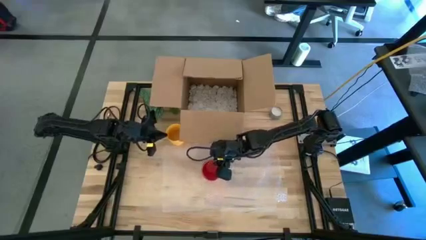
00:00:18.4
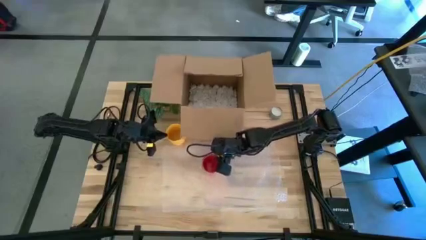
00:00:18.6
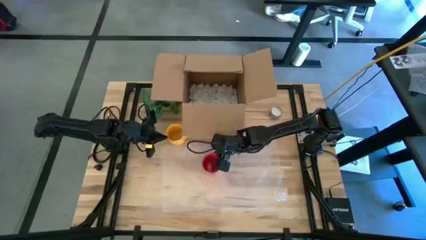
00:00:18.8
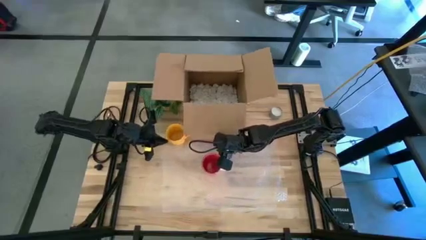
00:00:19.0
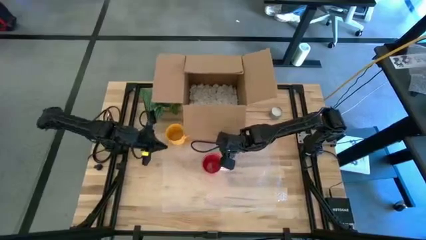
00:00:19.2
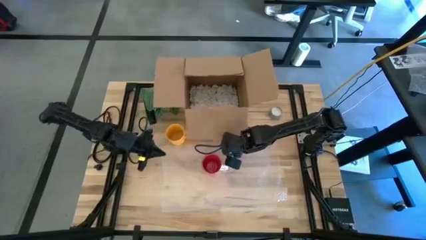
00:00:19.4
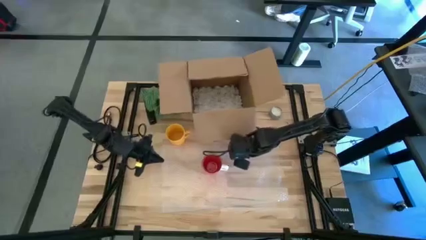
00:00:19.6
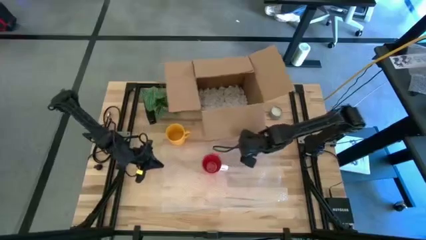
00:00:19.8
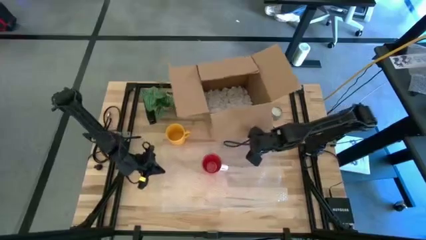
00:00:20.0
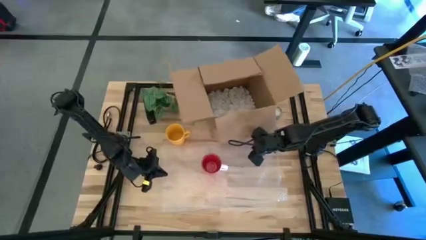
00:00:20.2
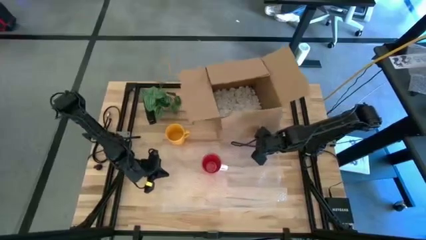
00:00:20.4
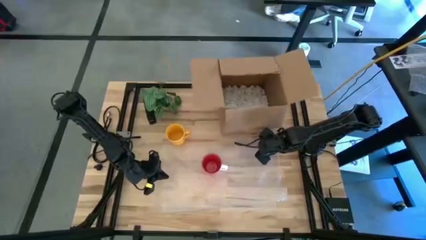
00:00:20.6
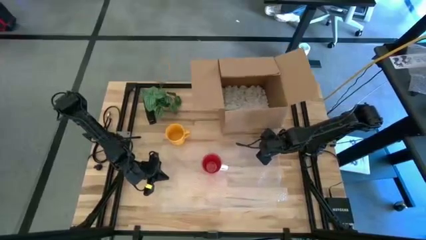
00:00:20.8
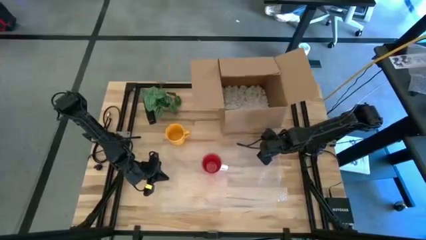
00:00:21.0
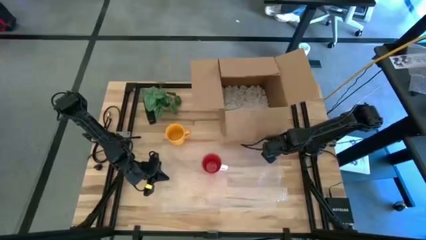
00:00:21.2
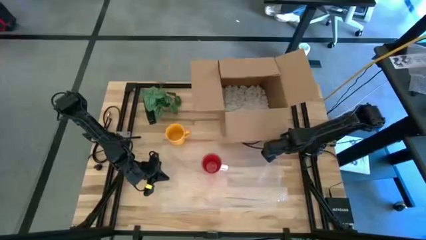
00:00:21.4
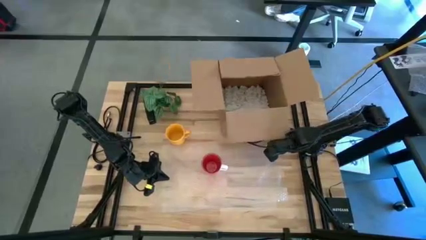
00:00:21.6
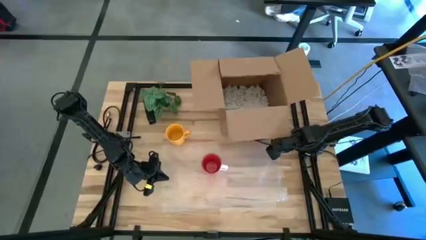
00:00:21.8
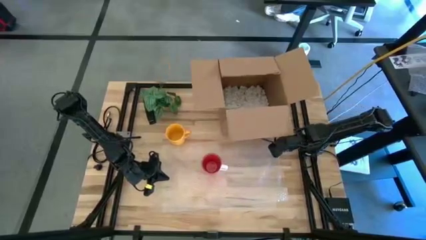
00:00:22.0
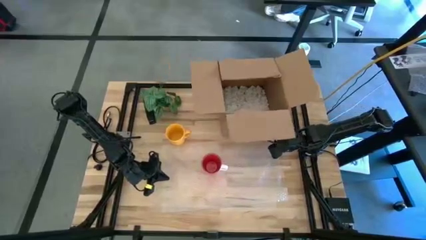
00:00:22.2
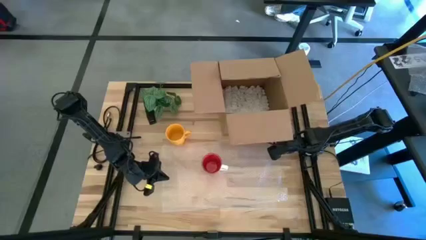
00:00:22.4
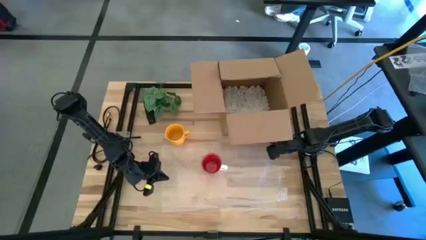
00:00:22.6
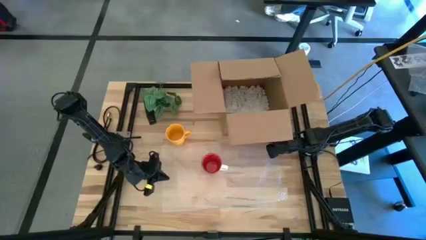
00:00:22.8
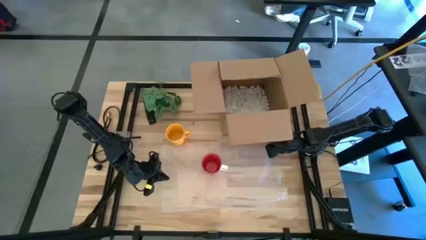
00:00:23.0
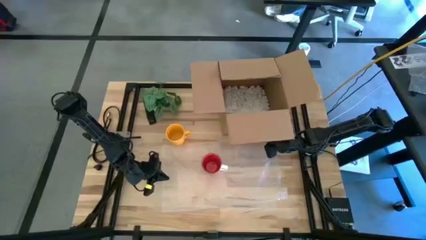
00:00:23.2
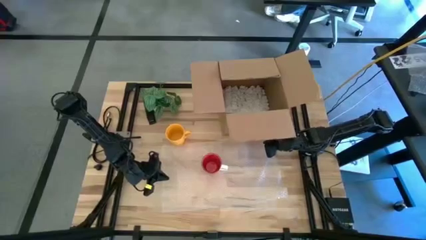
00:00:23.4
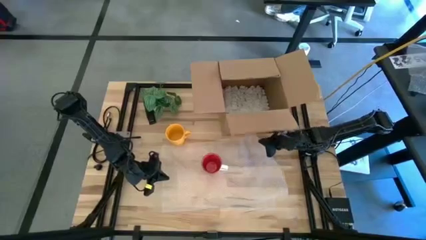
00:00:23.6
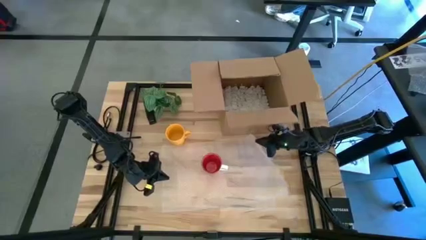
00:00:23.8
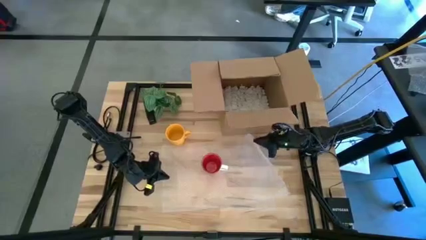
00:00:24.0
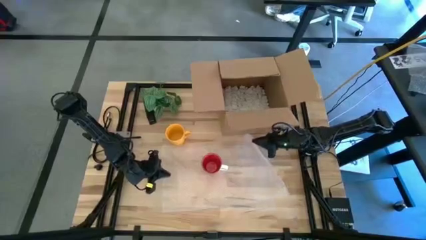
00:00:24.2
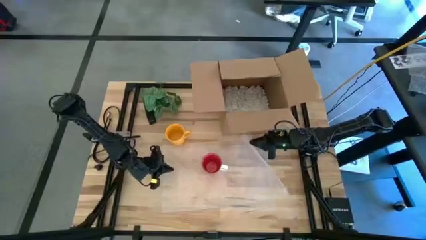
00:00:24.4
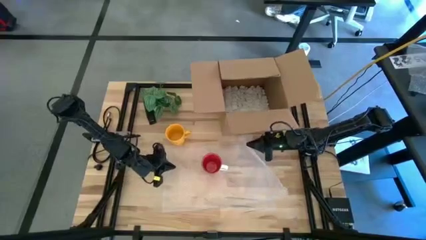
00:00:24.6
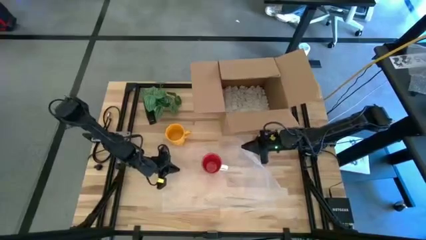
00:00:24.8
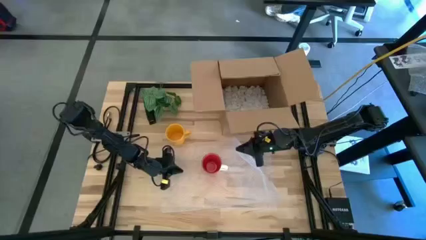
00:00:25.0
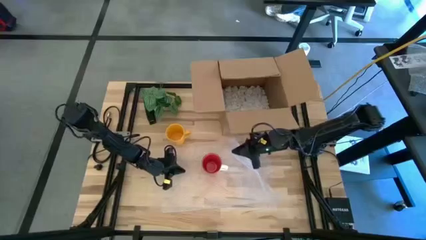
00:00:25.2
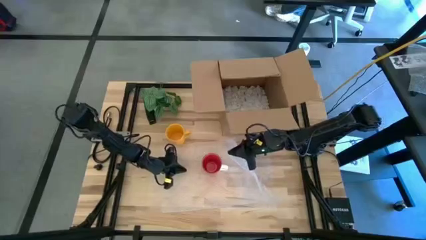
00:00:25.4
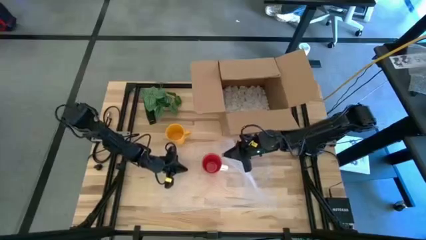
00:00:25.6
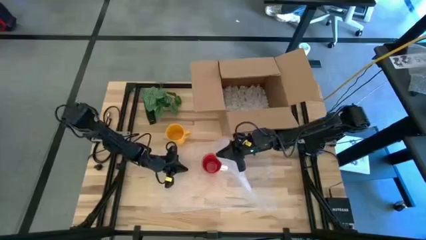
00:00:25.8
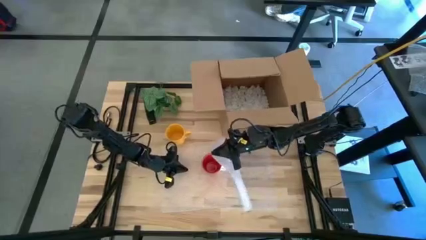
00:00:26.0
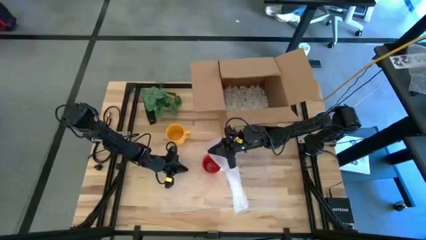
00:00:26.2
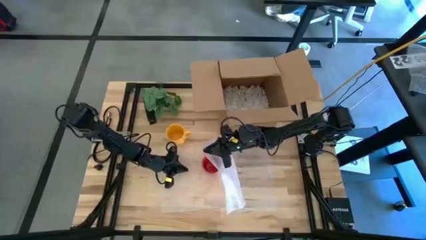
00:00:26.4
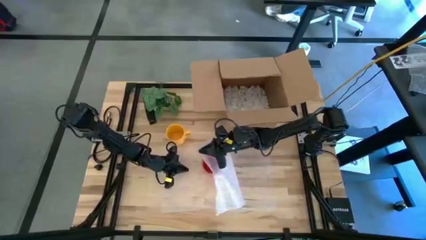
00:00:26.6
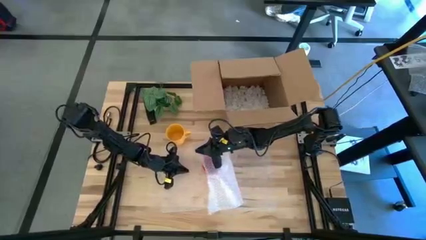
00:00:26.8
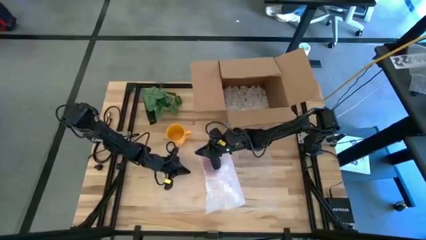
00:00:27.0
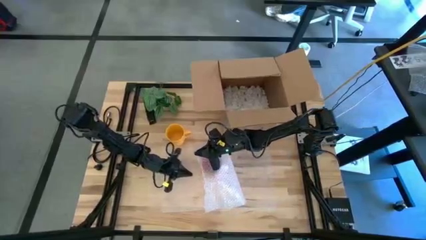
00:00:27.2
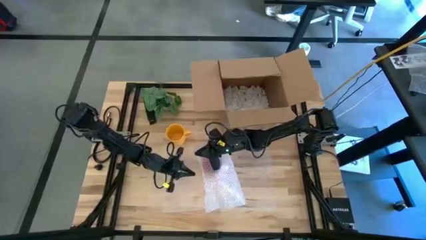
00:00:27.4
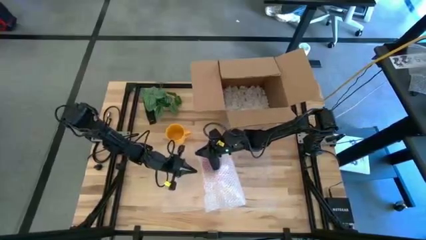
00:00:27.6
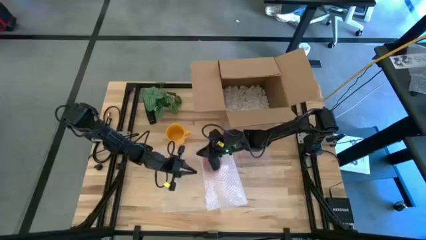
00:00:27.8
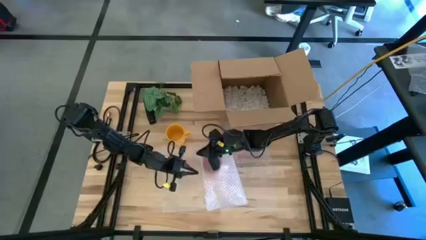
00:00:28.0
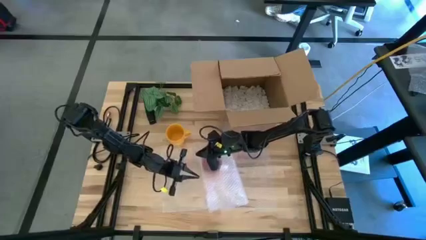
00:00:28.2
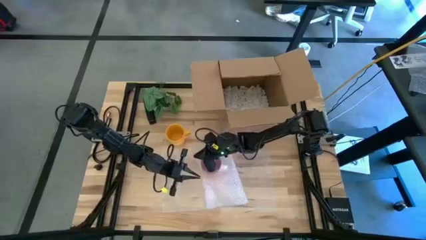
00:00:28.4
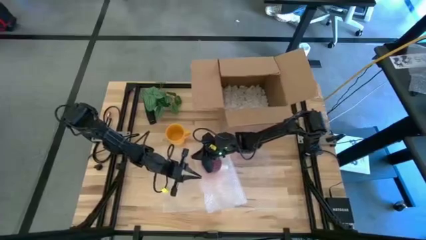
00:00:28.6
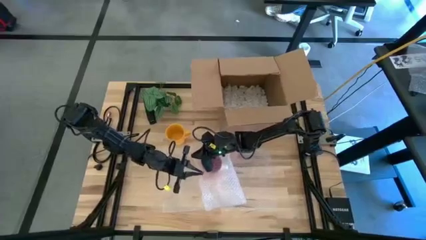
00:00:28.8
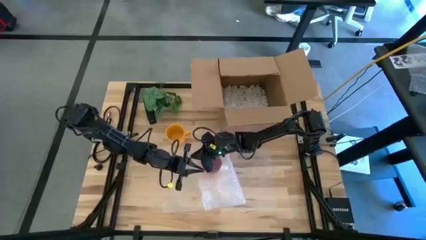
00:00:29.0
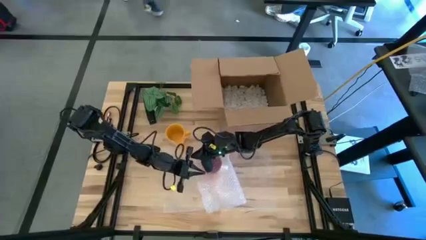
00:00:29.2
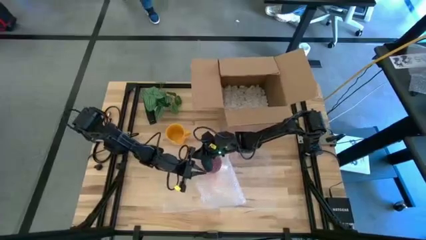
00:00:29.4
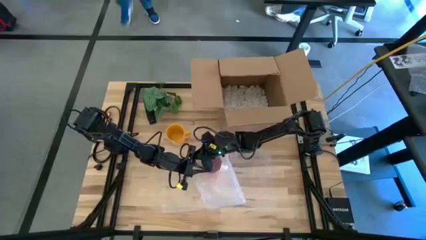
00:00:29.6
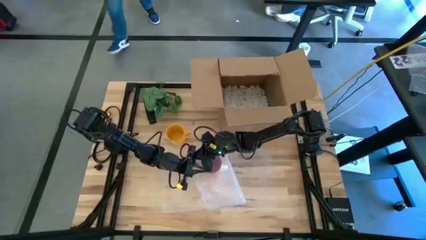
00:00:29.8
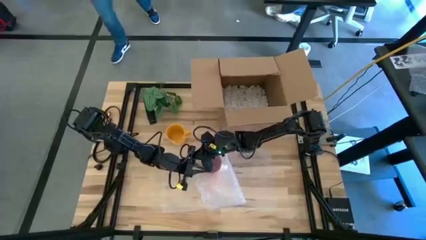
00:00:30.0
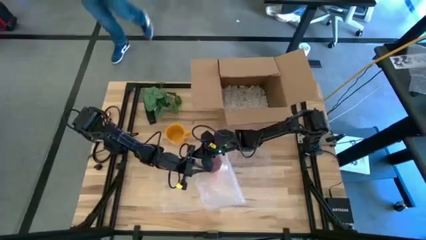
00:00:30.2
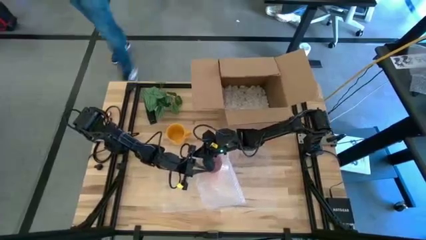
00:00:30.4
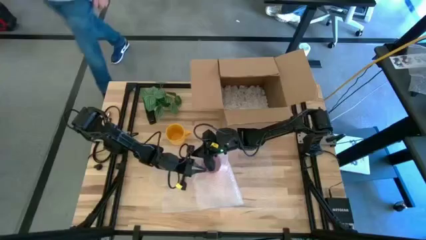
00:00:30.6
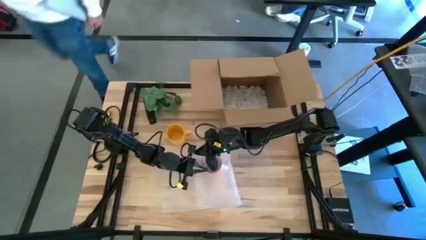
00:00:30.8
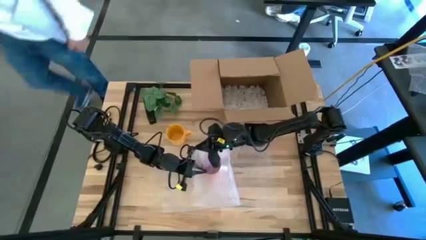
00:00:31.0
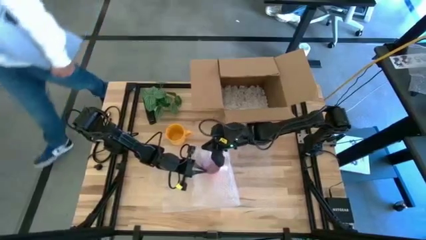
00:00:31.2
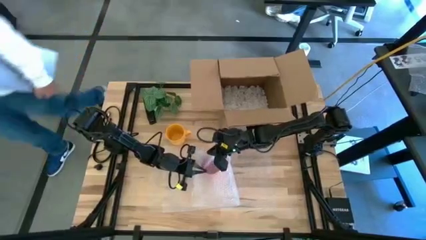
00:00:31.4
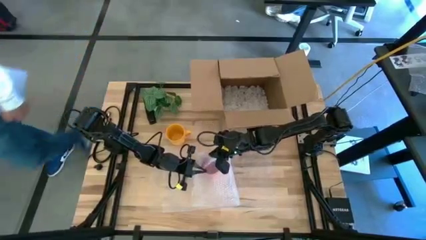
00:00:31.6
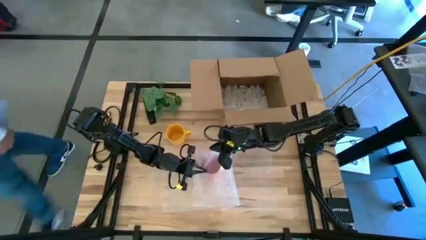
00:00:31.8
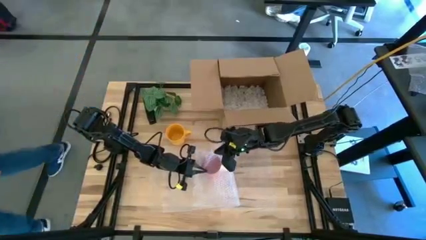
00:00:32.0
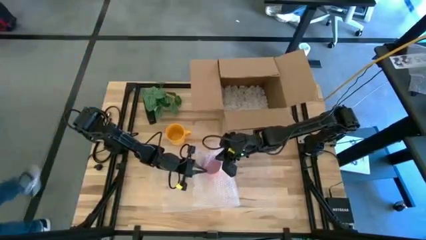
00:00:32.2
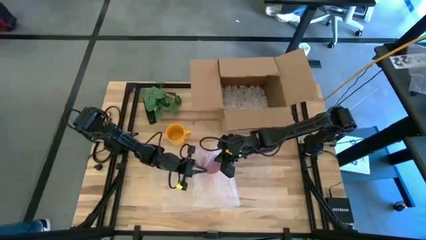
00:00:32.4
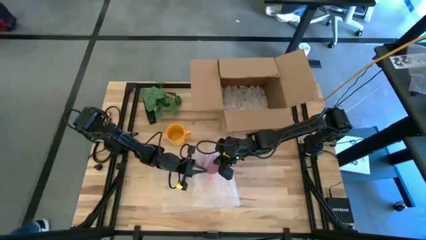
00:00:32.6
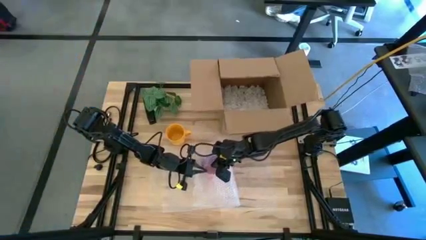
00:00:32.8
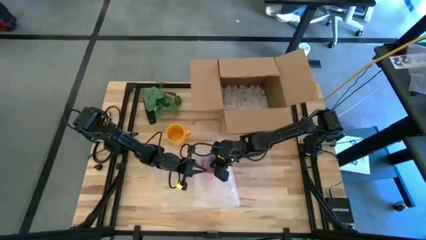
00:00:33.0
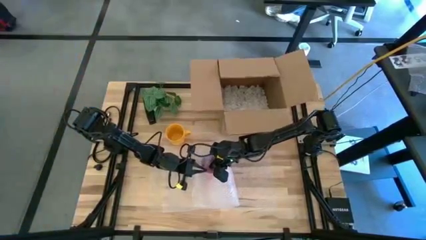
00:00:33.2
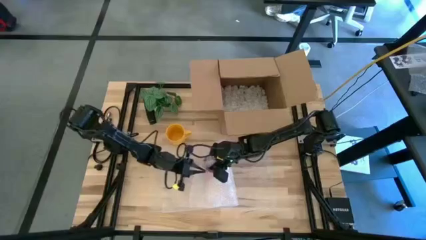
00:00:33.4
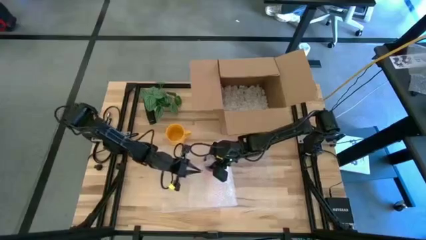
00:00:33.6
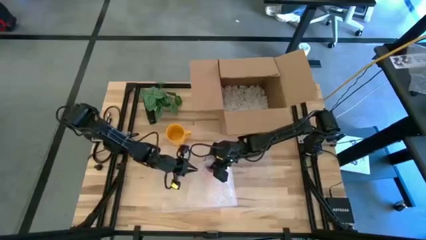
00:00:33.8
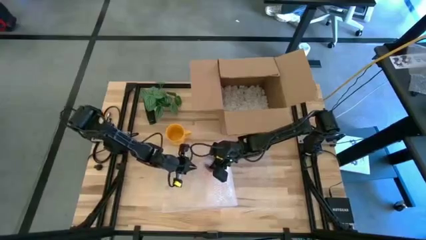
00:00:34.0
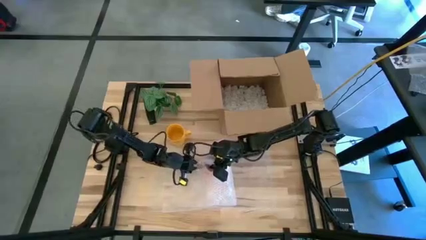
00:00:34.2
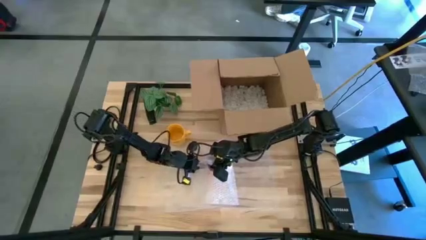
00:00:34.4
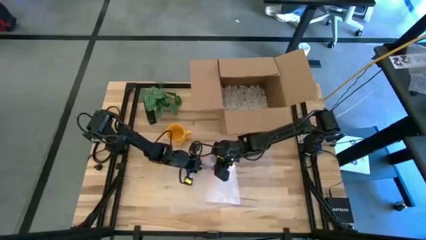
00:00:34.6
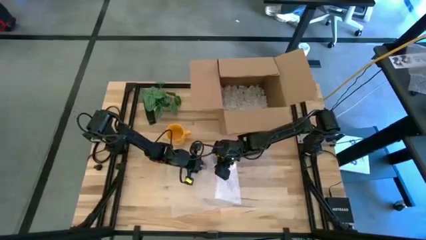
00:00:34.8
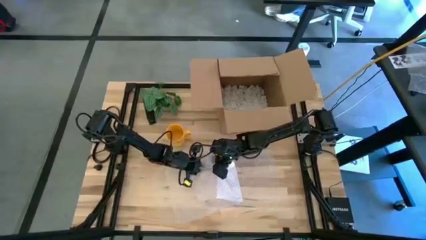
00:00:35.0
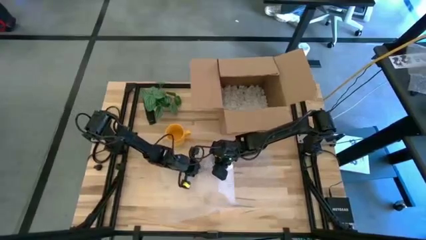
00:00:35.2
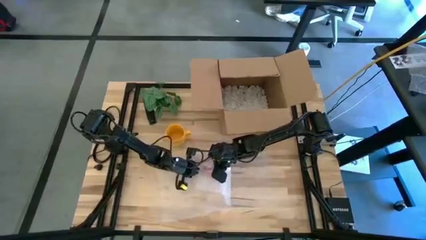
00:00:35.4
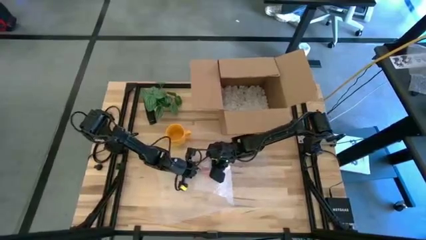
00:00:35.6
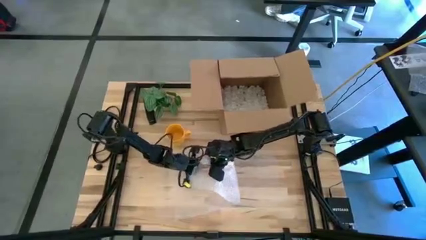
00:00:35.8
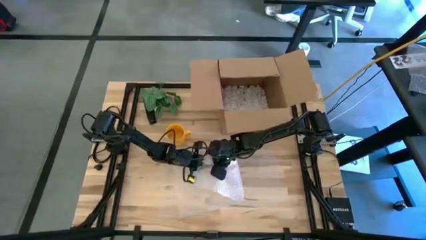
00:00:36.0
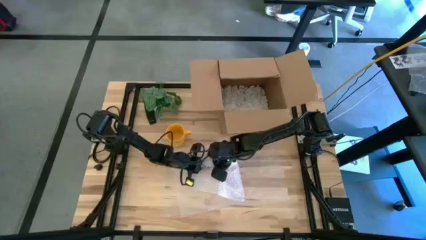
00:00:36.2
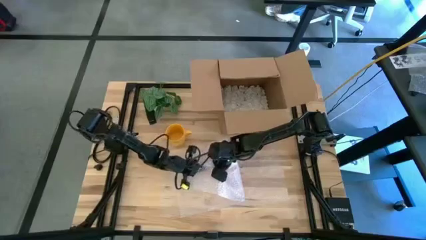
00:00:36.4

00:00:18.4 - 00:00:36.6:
Task: wrap mug
Wrap the orange mug with the bubble wrap
